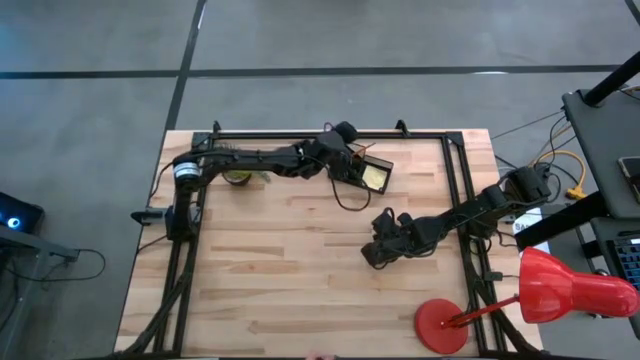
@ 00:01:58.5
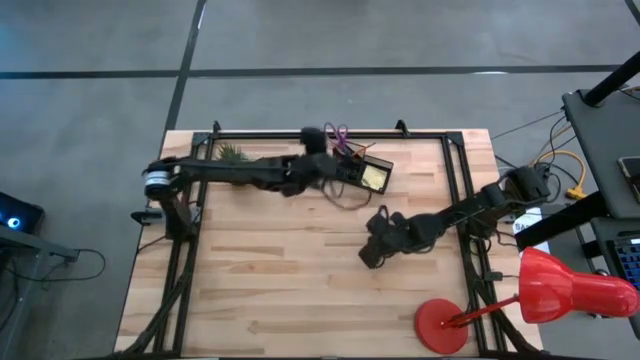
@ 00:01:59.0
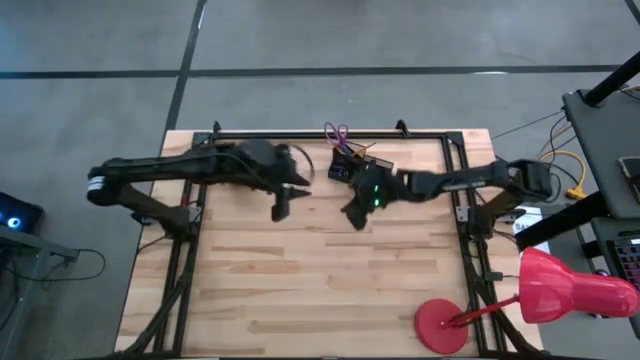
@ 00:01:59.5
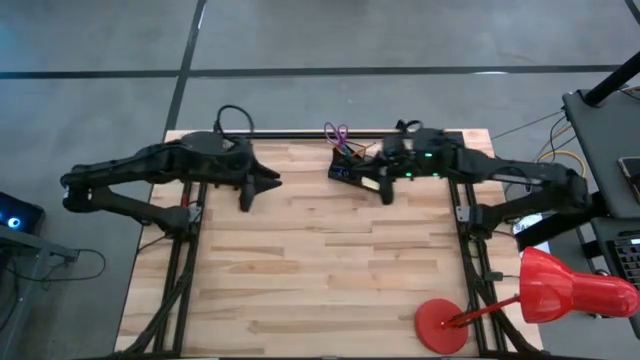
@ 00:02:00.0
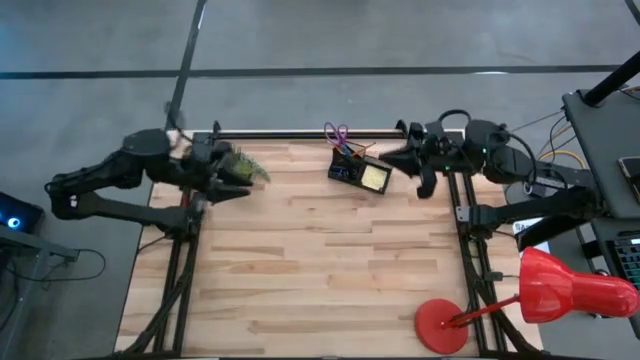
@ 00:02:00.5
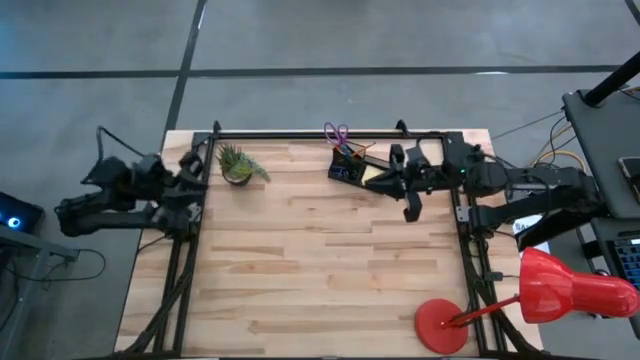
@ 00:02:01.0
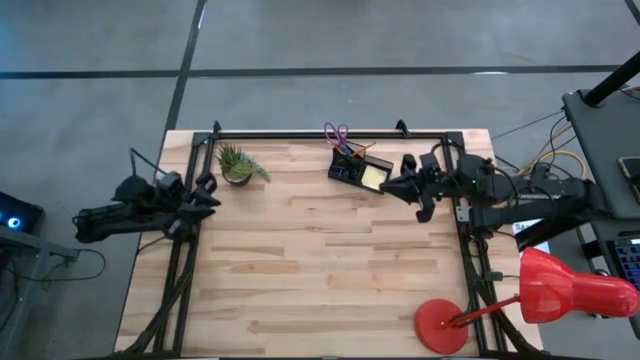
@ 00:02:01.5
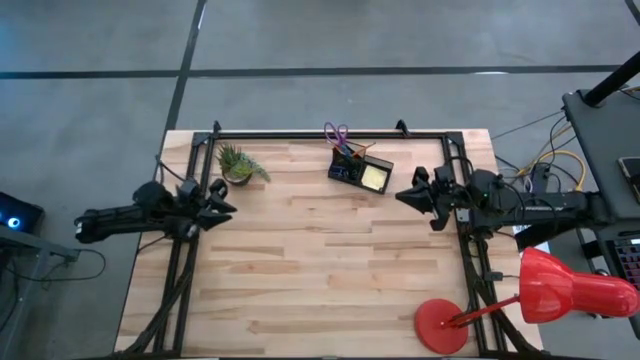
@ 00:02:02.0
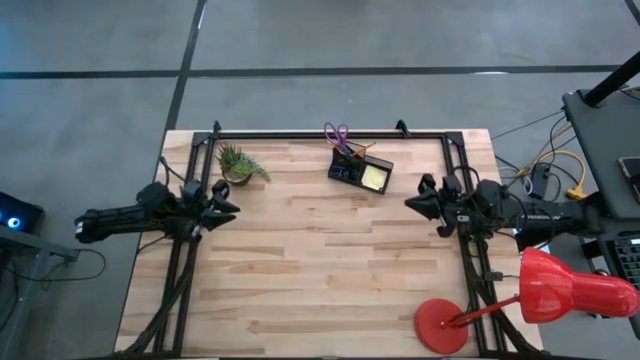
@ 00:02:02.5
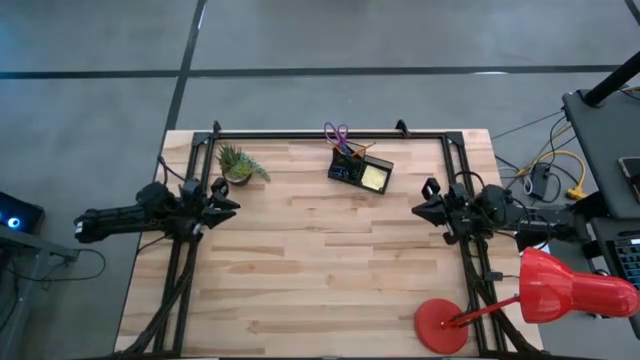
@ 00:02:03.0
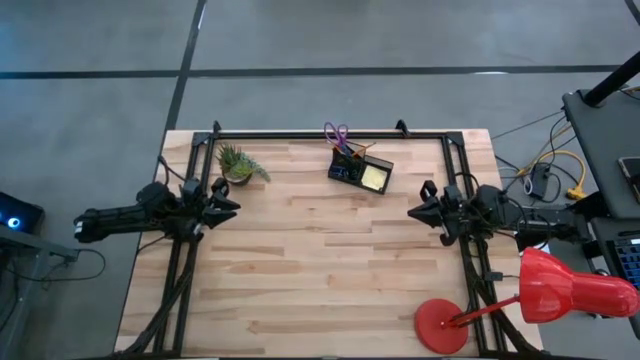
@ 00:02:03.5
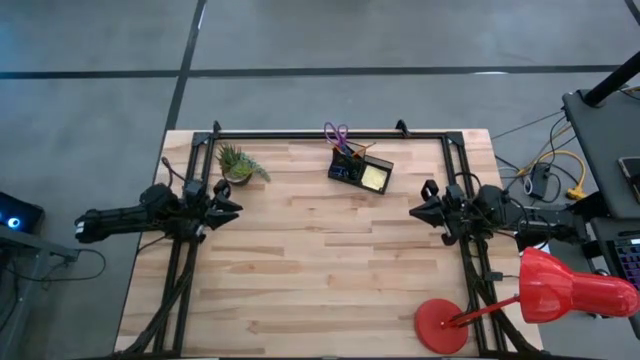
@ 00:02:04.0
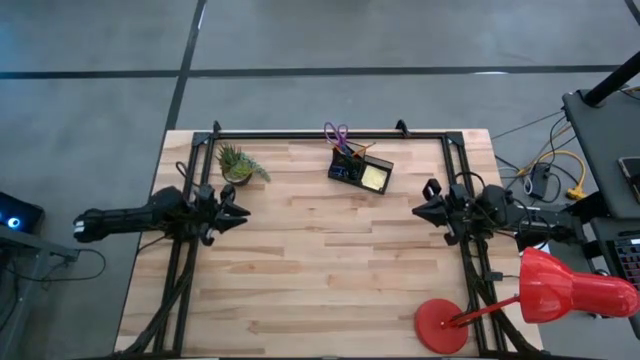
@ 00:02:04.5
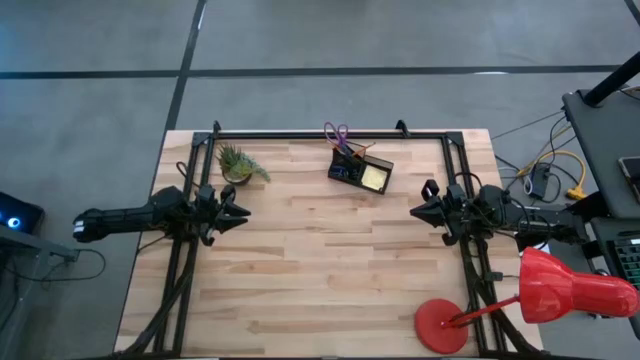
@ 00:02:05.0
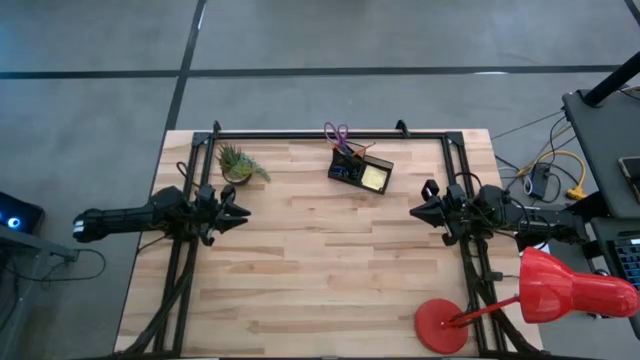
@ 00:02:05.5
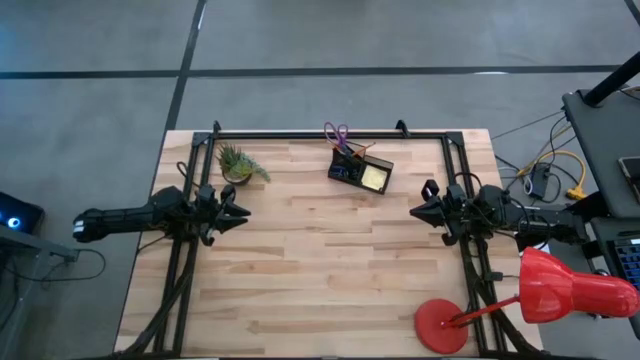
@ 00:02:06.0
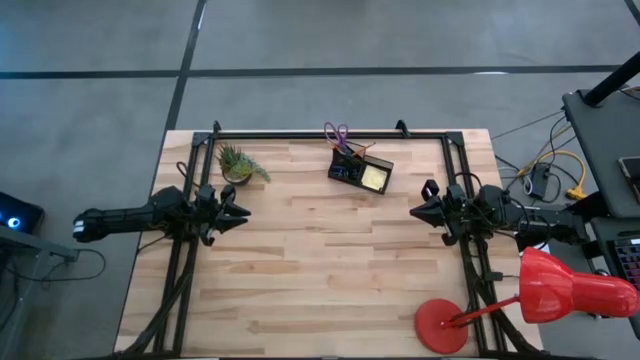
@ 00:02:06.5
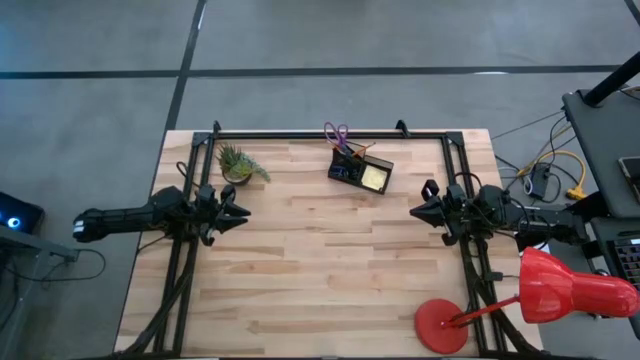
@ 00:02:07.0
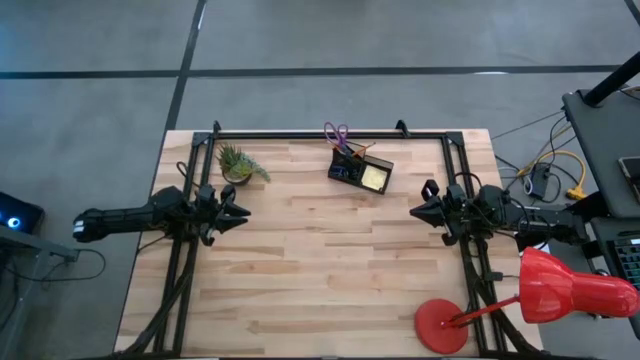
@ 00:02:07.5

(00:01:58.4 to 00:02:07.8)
Task: Pick and place office supplies into organizer
Return to Home Position

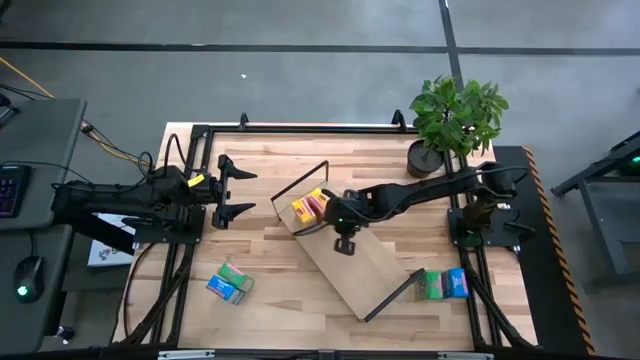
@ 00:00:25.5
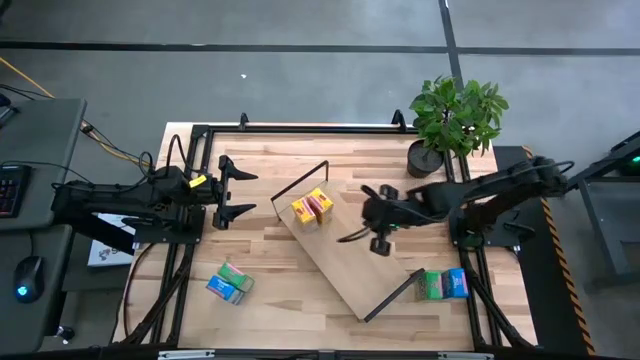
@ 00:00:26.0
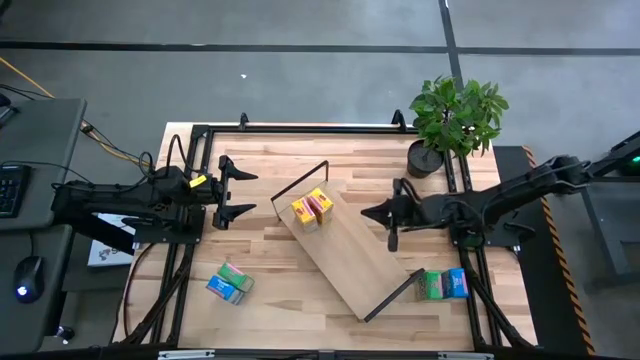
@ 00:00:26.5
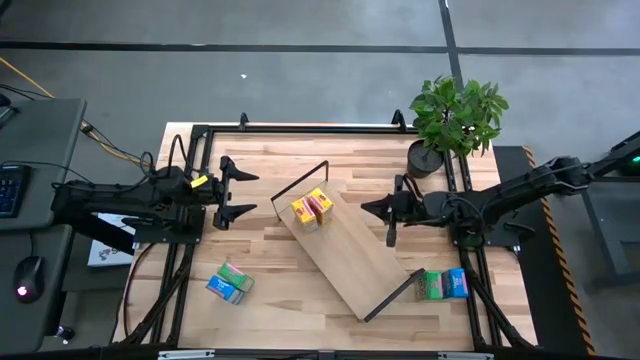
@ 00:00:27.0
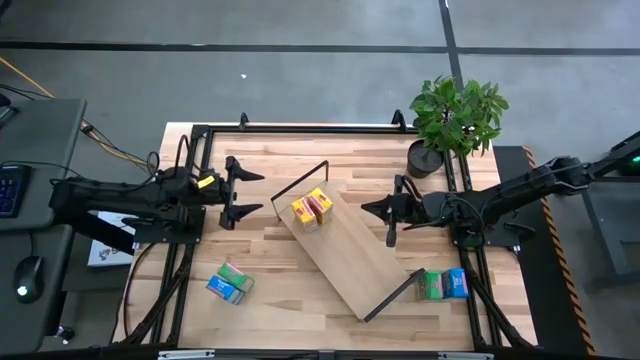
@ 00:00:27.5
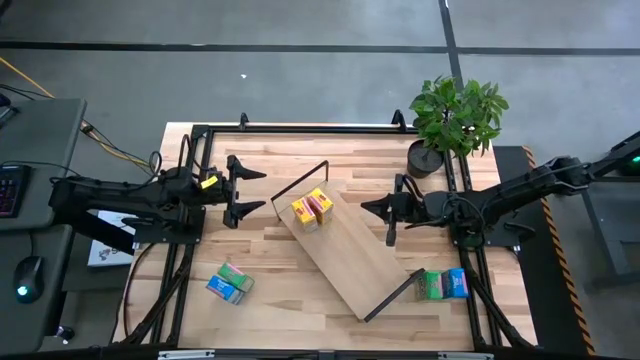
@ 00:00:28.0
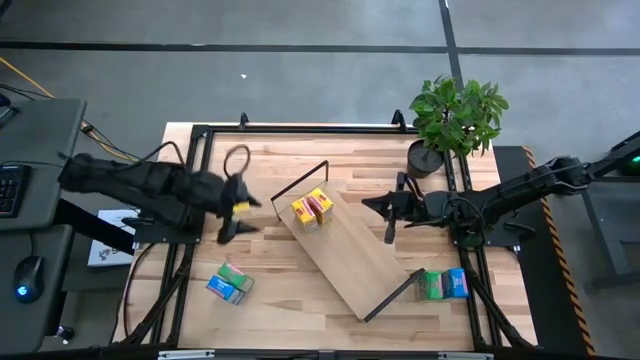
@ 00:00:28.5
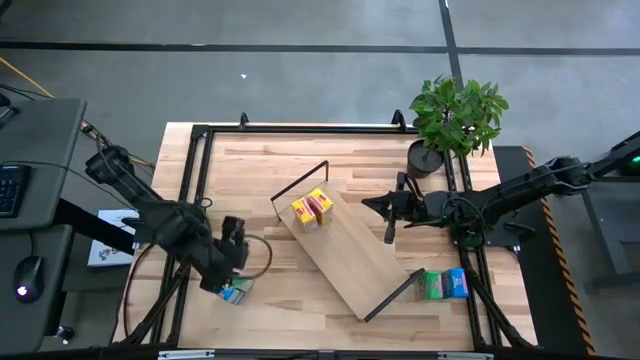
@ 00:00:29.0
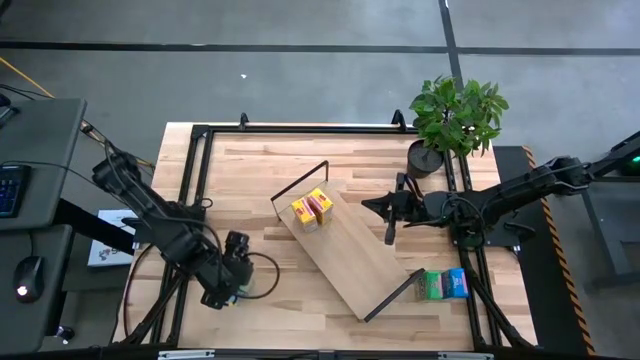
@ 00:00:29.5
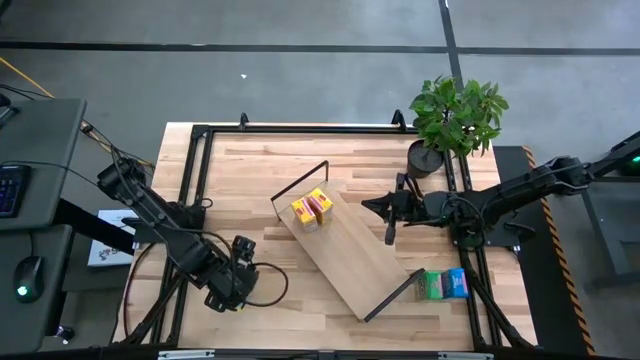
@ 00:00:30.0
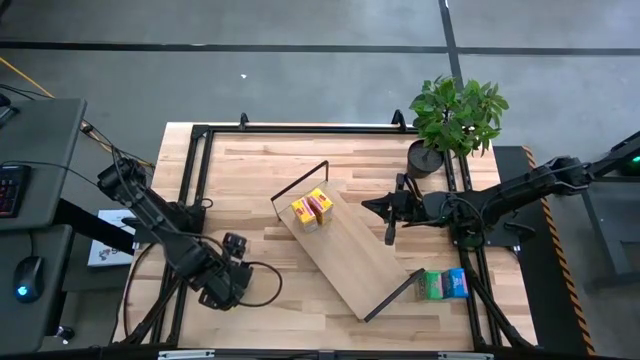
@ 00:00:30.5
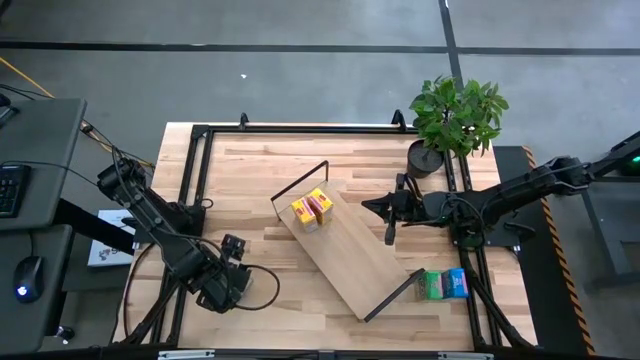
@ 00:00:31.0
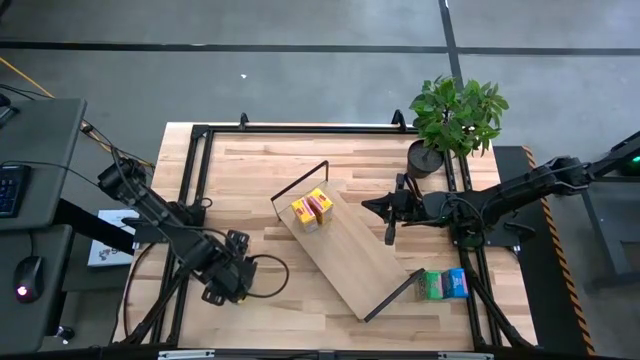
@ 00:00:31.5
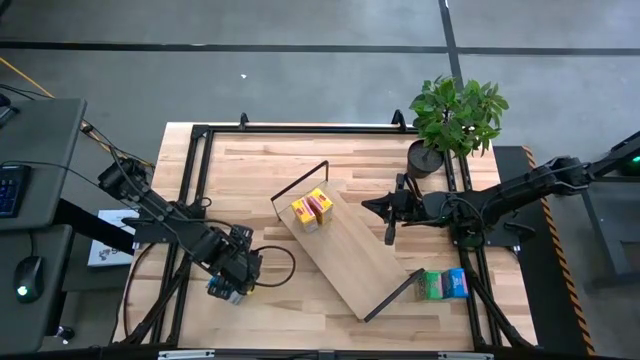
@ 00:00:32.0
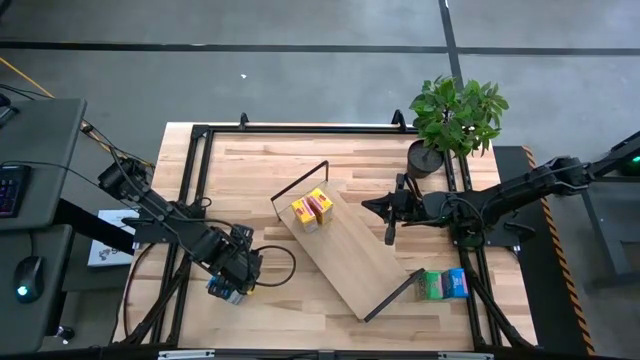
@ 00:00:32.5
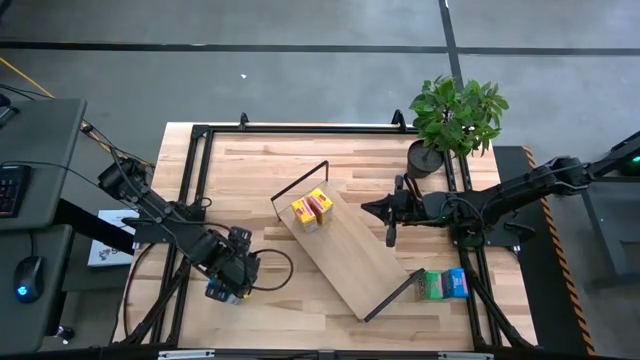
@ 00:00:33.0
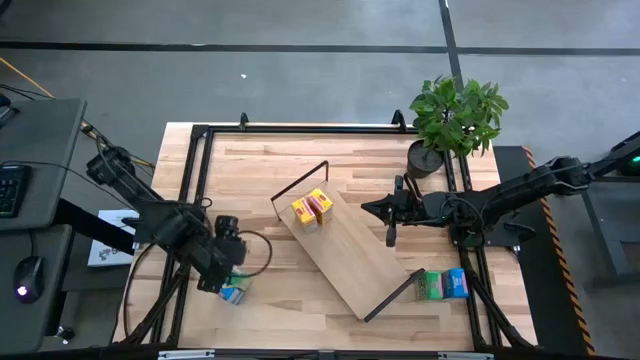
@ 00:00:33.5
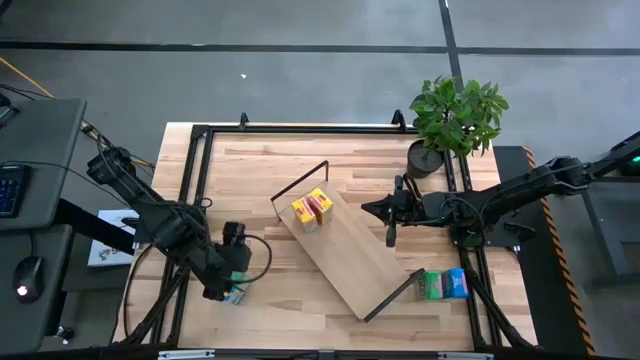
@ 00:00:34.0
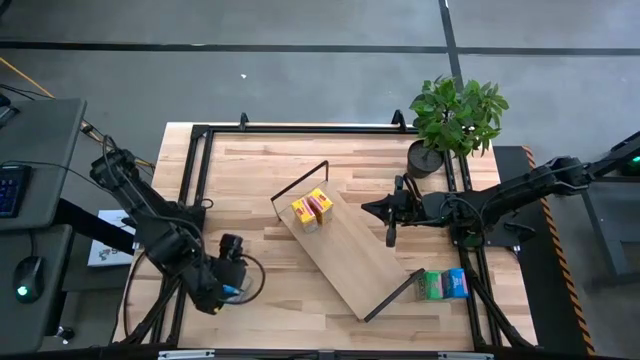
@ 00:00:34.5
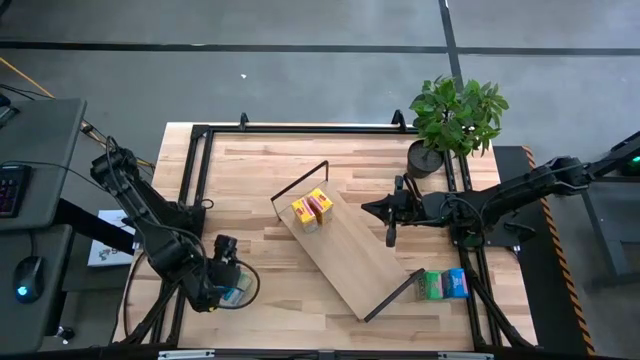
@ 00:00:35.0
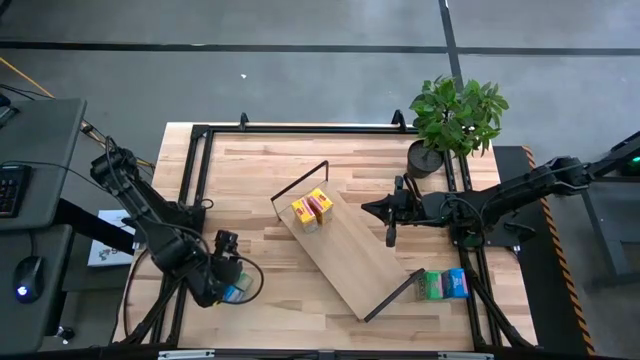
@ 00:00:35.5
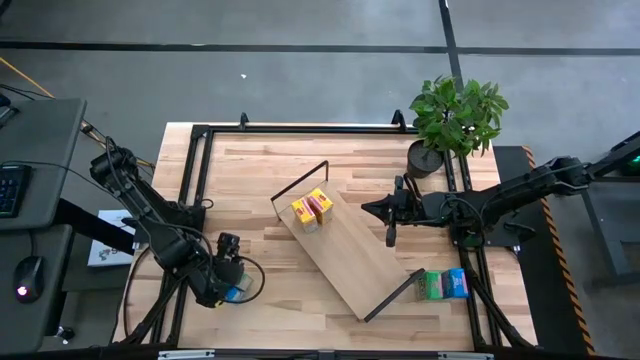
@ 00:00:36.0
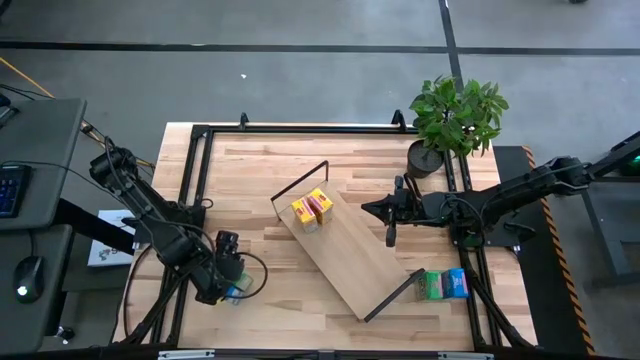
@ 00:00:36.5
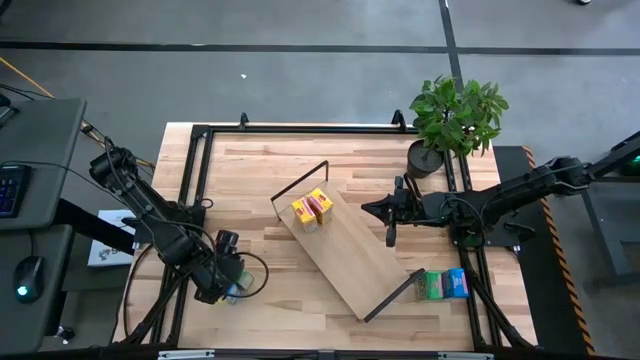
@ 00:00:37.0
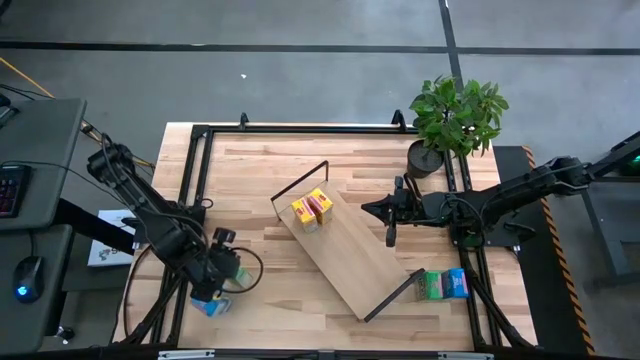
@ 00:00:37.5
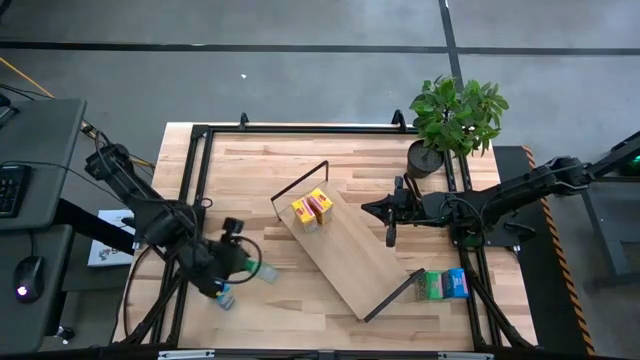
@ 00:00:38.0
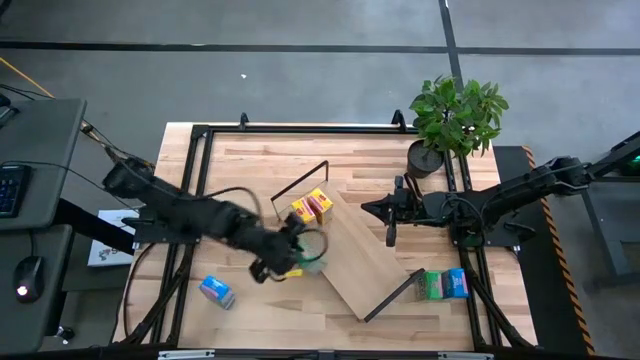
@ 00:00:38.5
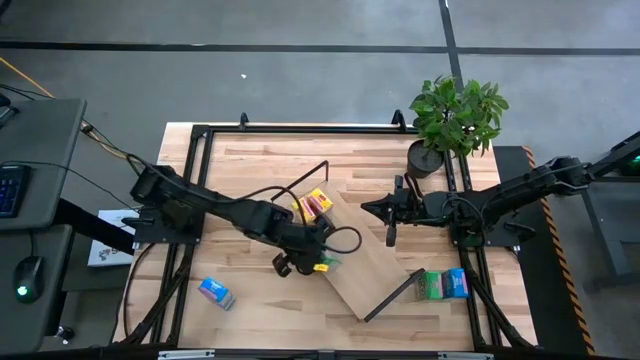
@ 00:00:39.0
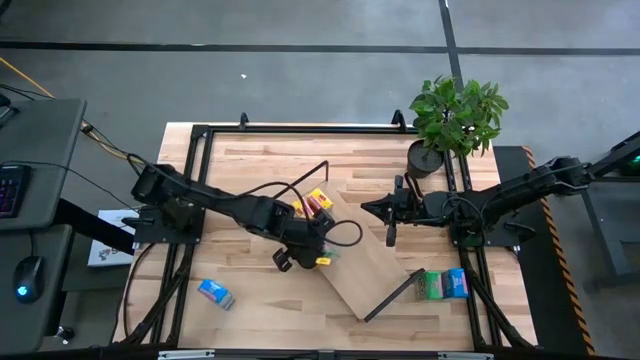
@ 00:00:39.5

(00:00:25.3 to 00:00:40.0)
Task: Stack cereal on shelf
Put the left green cereal box on the shelf
